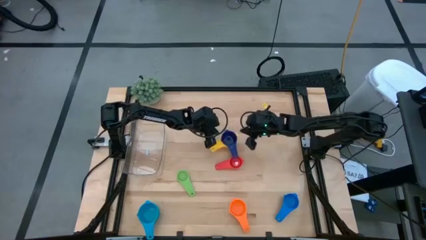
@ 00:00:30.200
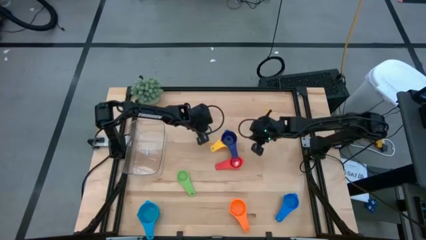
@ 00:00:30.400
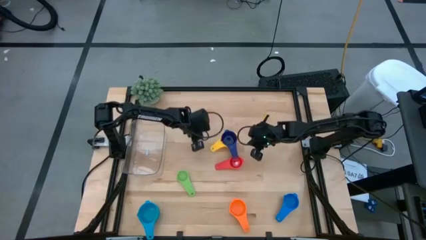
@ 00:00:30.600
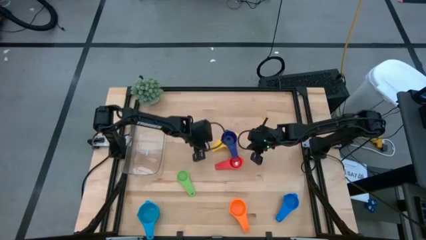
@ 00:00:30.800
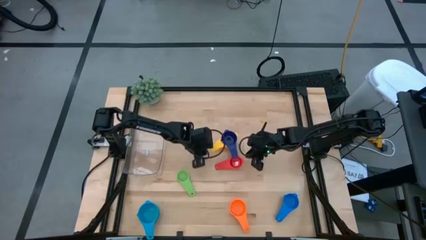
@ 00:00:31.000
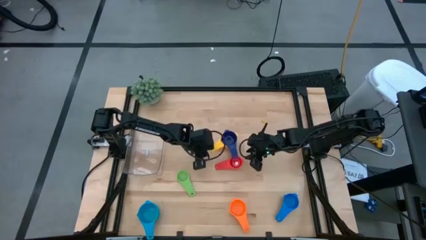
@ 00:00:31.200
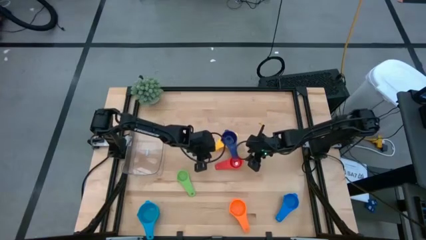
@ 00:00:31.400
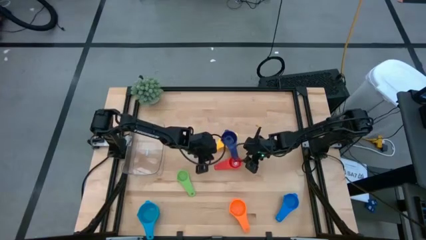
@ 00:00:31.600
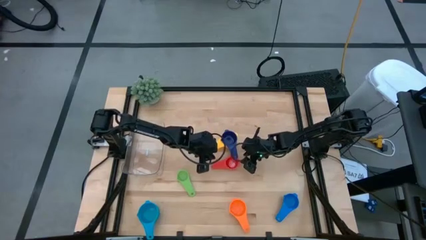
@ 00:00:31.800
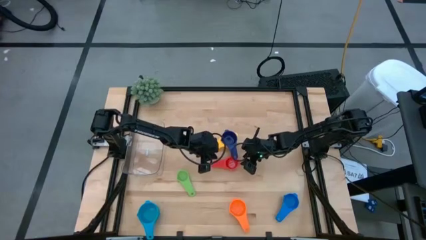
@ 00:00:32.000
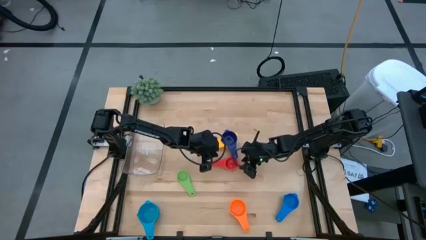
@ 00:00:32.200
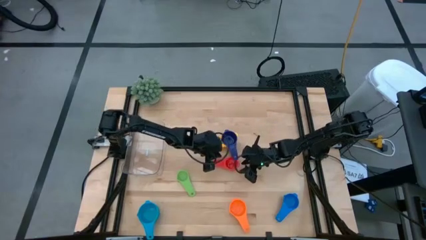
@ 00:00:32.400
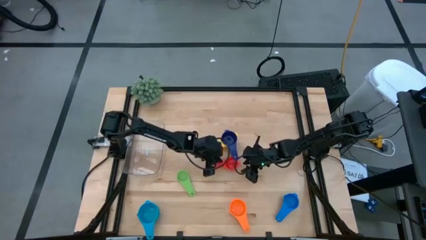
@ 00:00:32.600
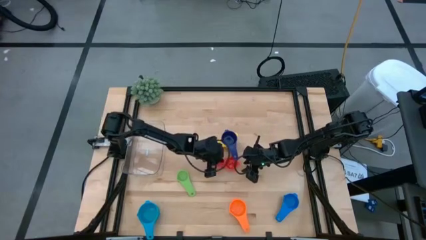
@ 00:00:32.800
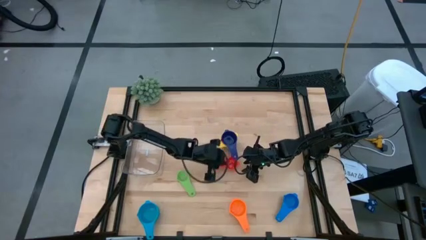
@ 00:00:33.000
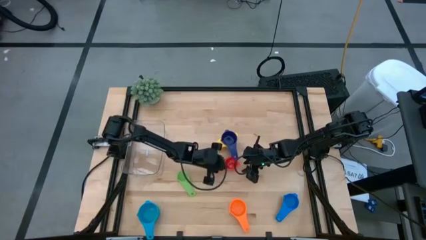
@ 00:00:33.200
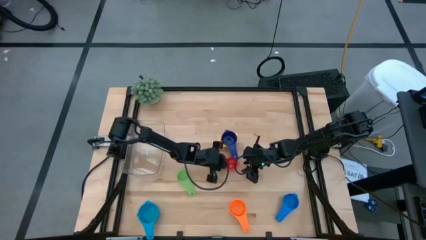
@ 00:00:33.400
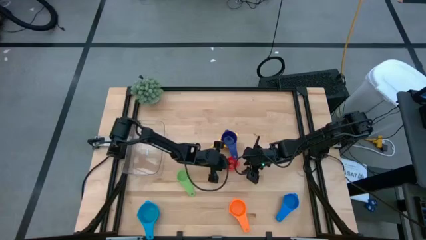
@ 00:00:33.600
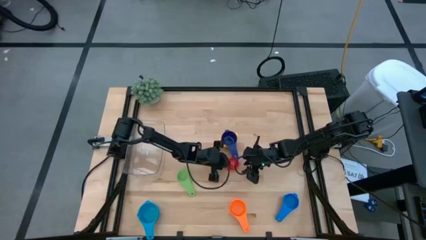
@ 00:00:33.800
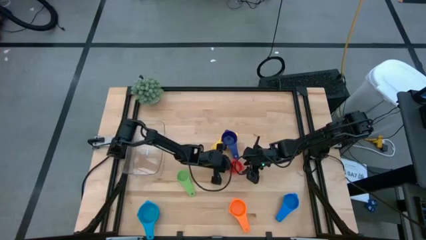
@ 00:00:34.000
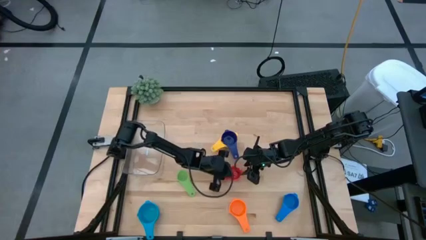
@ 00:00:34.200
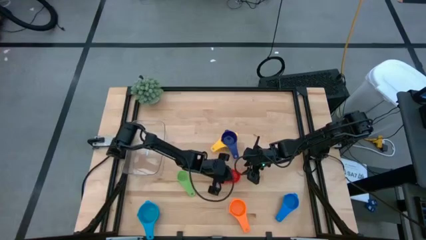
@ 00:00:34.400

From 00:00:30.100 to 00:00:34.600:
Task: Nest measuring cups in basket
Adjust the red measuring cup on the table

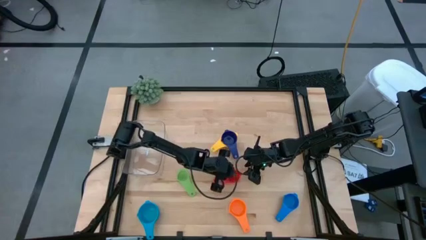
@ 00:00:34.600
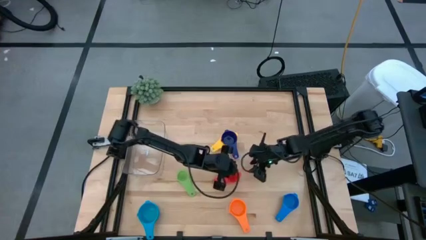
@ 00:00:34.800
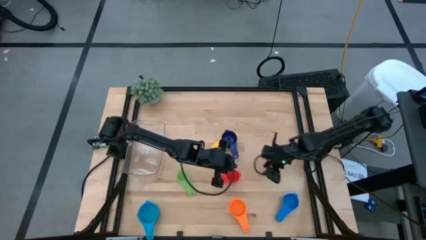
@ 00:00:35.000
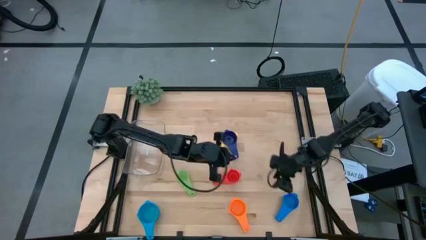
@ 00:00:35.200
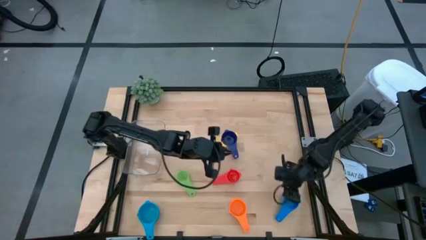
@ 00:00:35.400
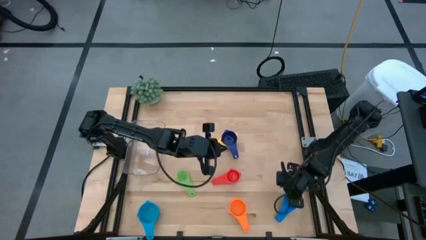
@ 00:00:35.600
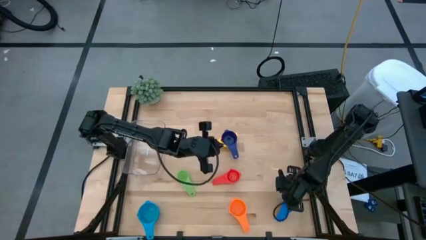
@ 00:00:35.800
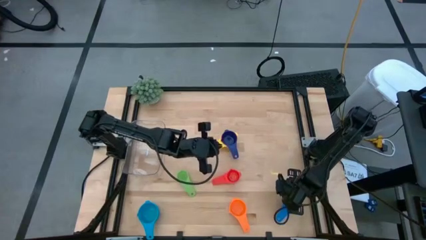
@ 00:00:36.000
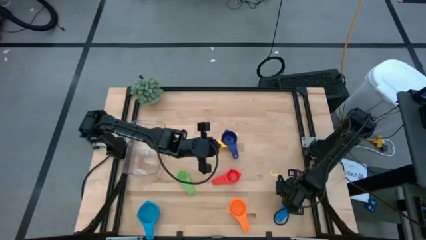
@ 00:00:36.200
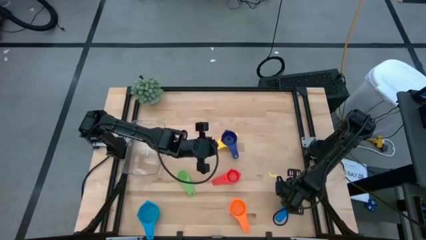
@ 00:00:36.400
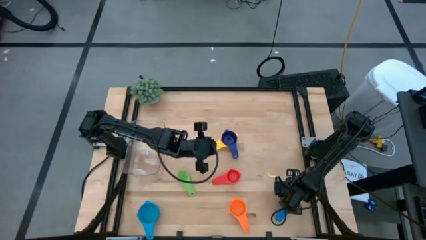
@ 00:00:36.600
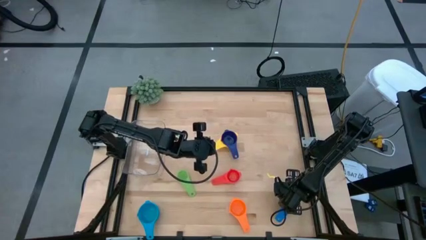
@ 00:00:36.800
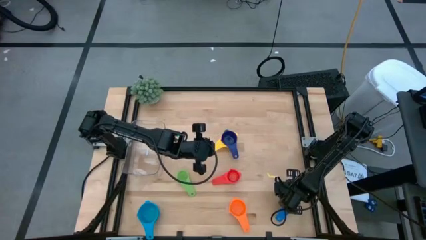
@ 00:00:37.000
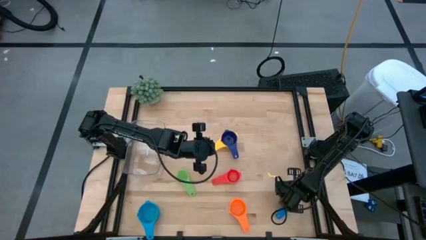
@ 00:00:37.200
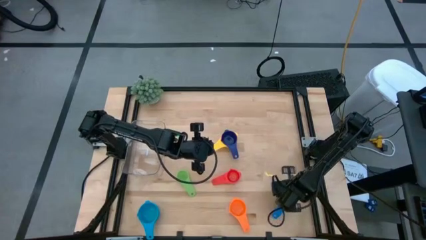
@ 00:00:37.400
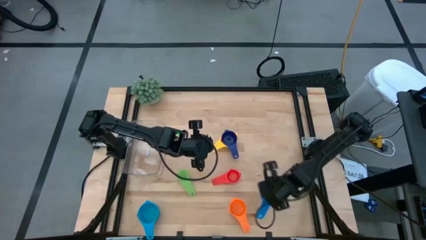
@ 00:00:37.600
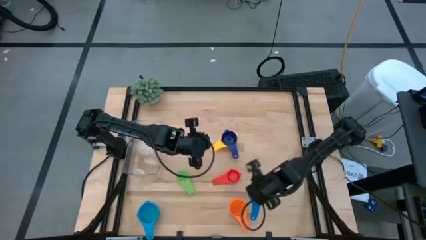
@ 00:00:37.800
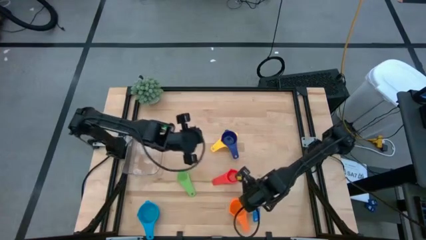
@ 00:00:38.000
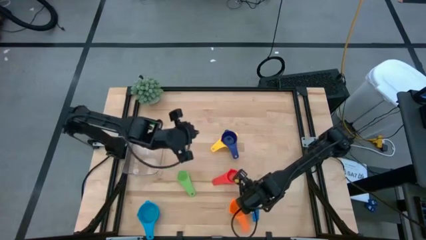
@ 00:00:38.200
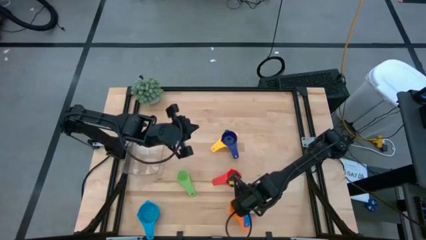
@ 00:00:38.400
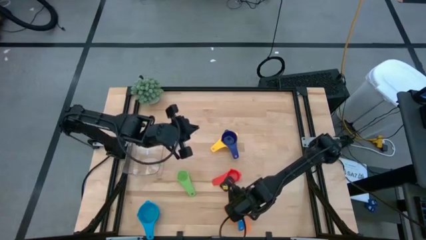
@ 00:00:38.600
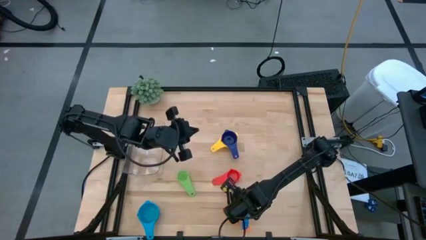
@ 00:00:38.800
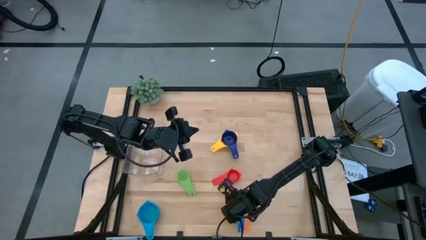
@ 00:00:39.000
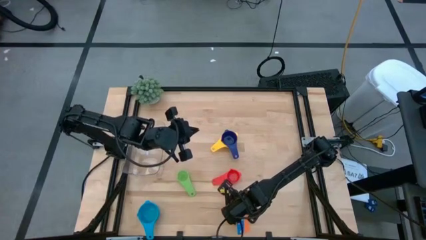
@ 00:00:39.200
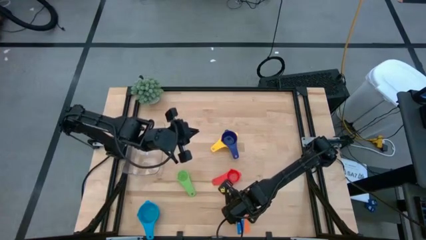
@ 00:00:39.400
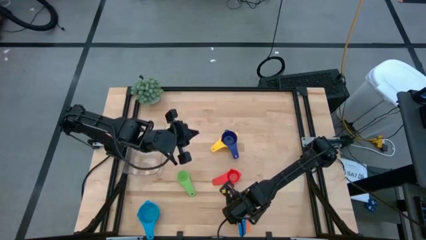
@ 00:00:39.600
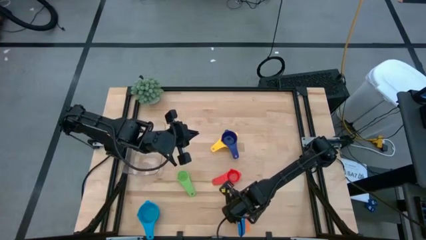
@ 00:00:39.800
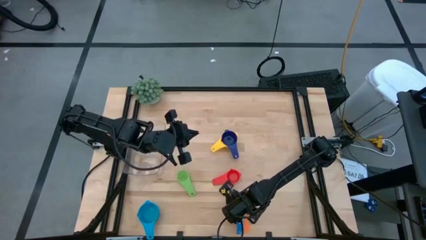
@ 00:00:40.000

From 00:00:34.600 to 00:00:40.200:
Stack the right light blue measuring cup on top of the orange measuring cup

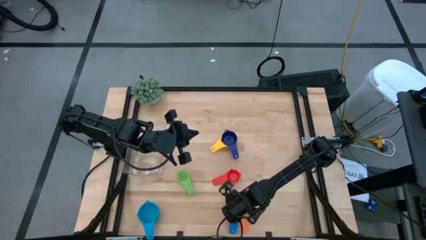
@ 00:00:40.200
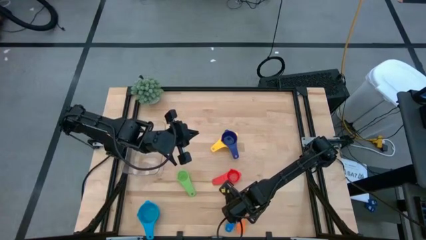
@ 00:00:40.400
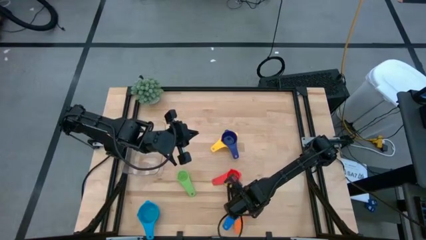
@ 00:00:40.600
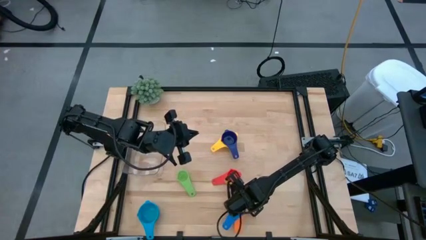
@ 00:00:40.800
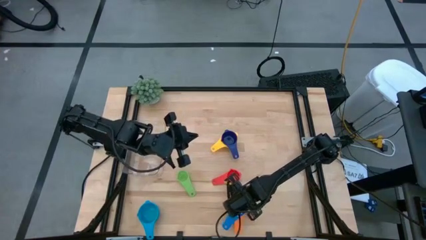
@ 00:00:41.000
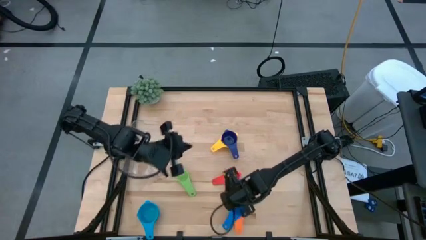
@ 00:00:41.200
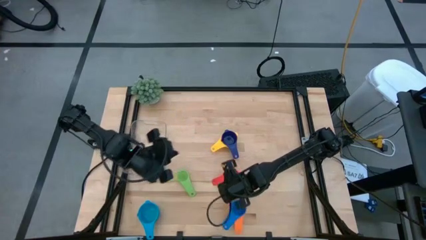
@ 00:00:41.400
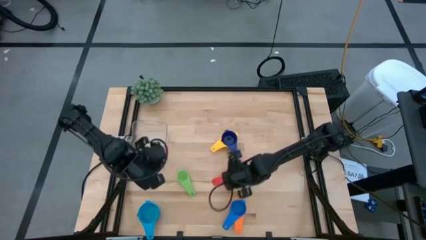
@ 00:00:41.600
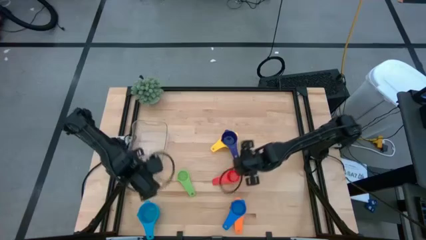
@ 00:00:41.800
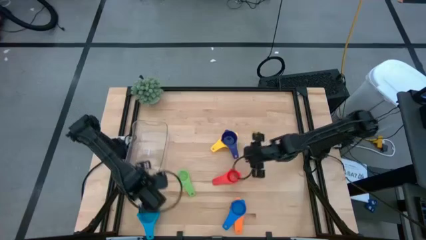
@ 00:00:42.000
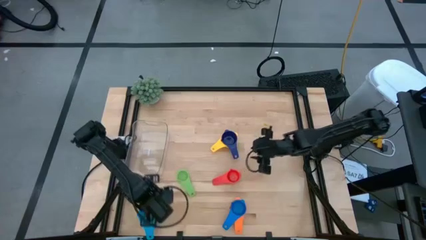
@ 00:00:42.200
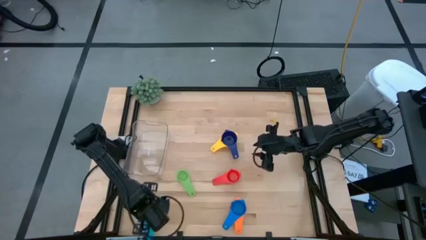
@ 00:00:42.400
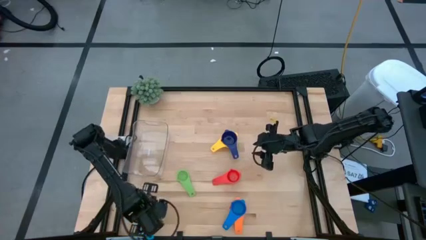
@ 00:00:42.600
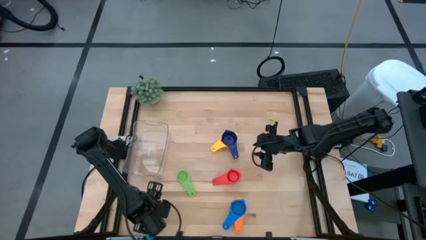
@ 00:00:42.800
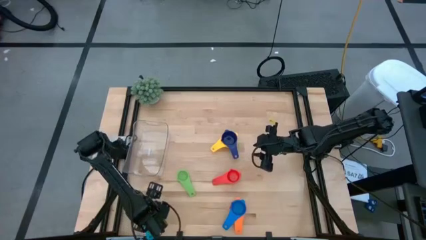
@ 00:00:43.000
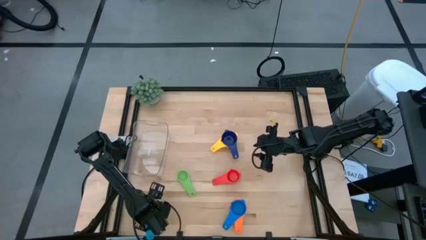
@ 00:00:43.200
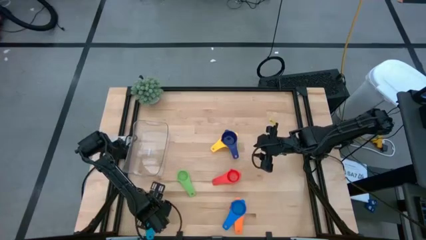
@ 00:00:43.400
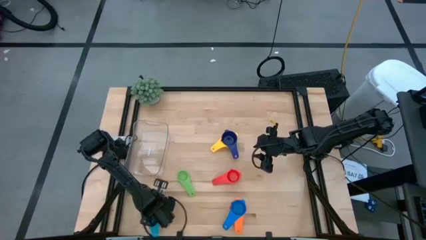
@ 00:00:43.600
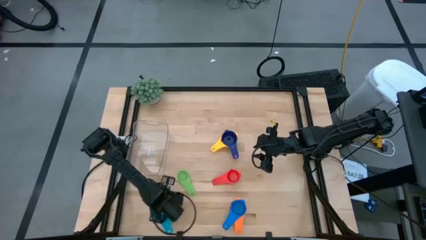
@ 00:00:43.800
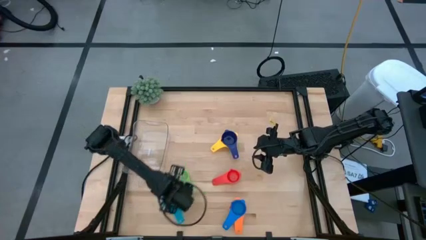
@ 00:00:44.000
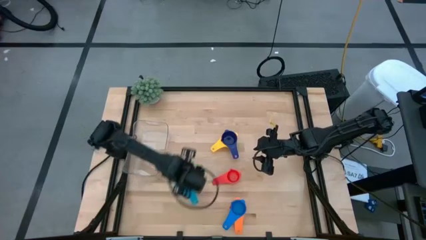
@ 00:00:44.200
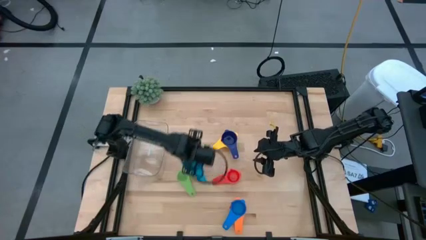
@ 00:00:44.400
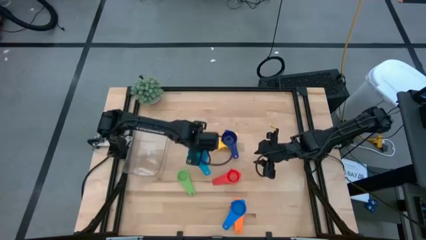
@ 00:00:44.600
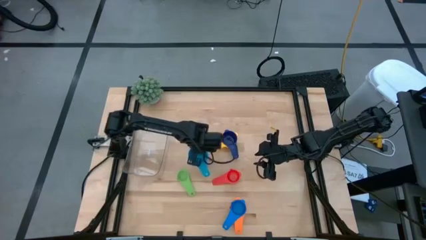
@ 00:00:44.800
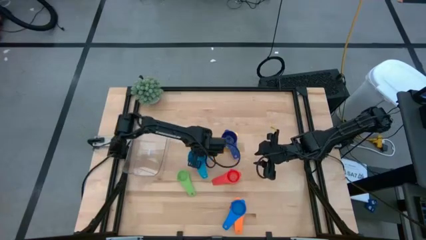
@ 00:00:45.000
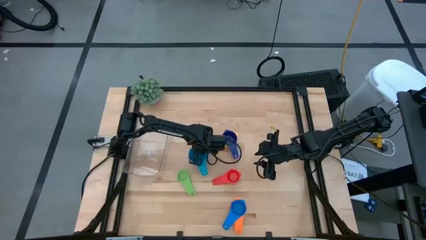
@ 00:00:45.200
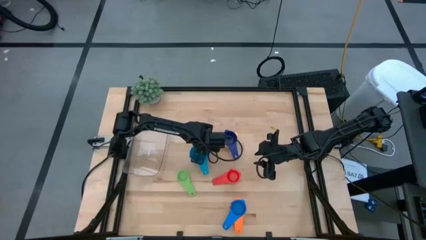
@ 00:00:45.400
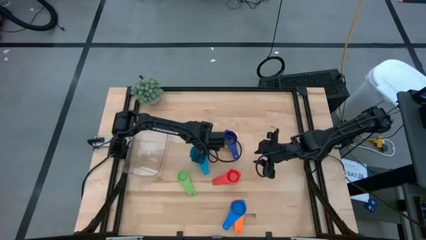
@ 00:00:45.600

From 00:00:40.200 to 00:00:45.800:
Move the blue measuring cup to the center of the table
